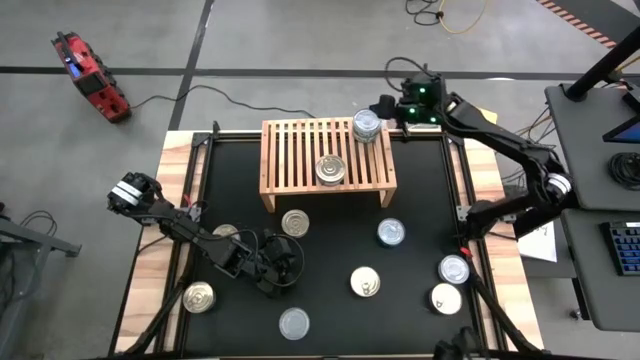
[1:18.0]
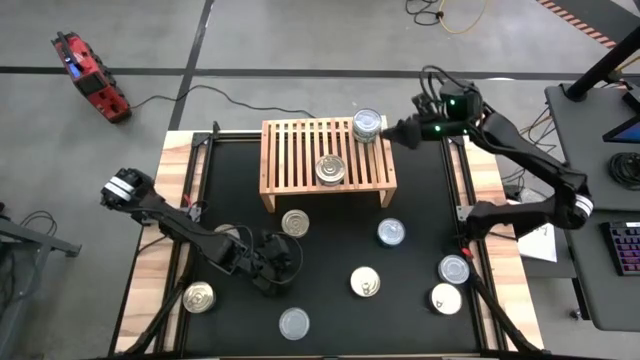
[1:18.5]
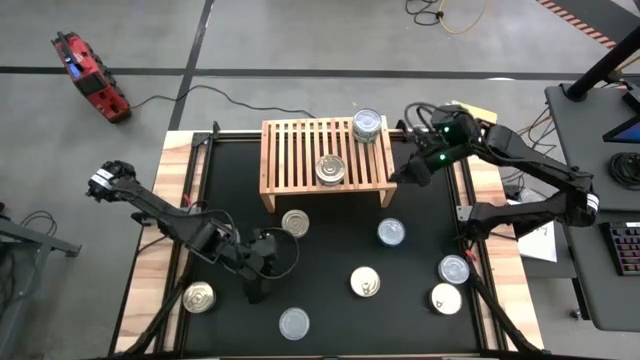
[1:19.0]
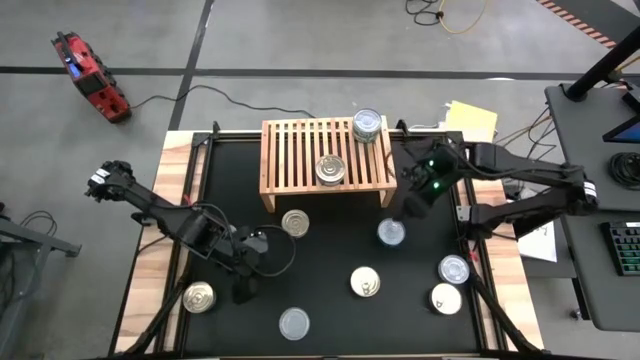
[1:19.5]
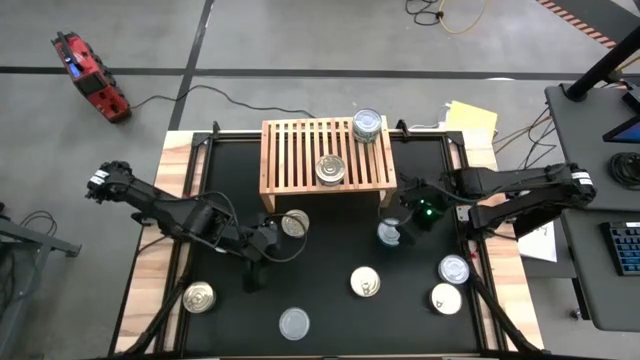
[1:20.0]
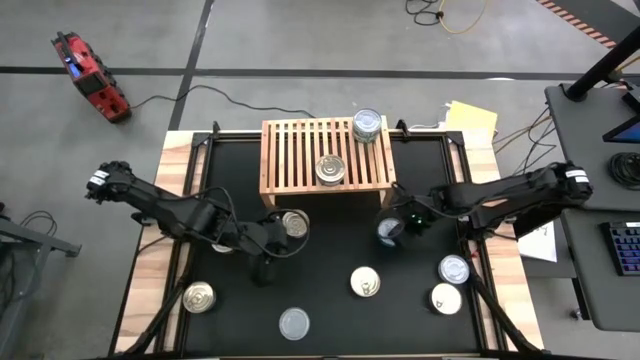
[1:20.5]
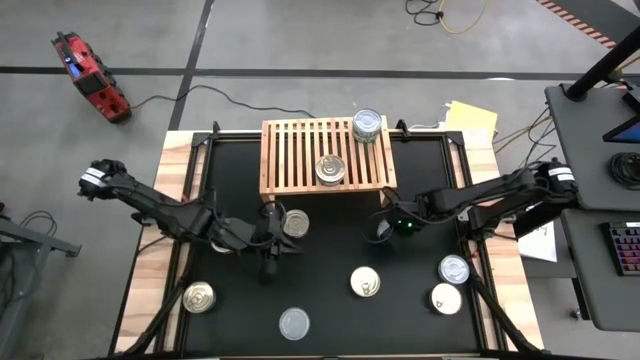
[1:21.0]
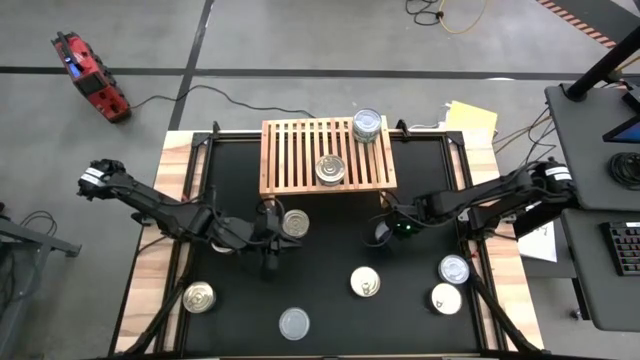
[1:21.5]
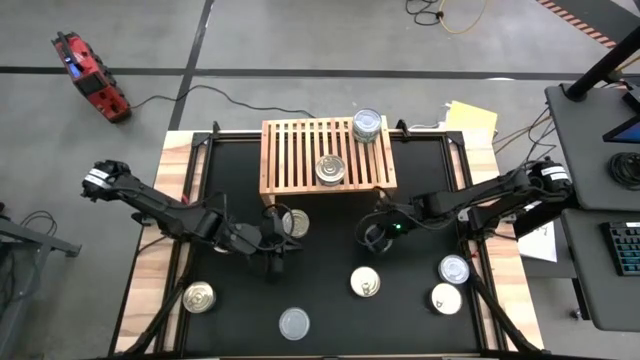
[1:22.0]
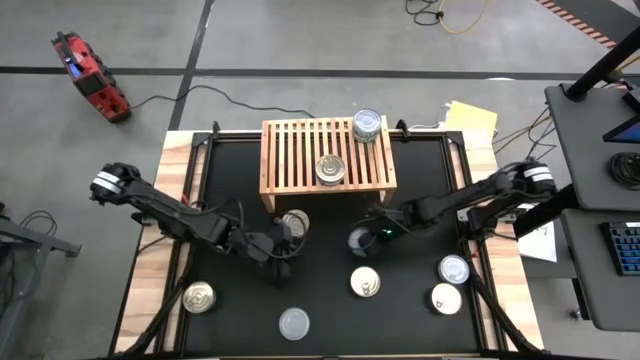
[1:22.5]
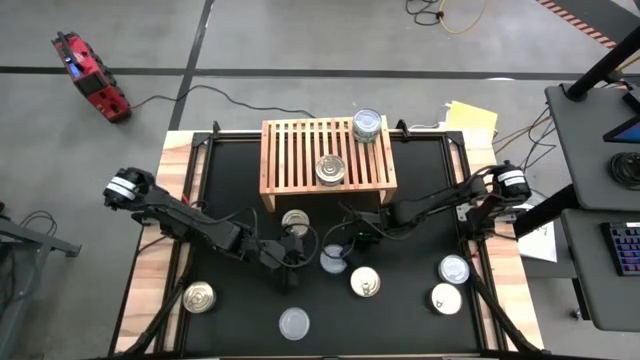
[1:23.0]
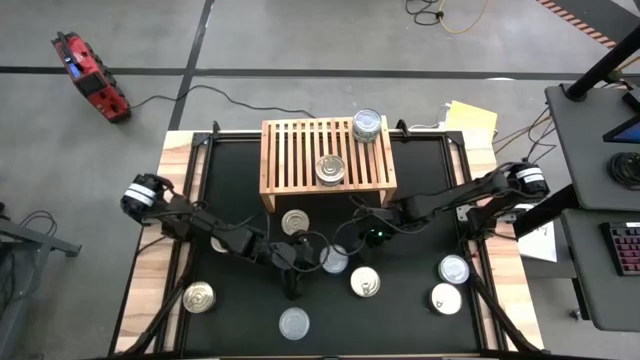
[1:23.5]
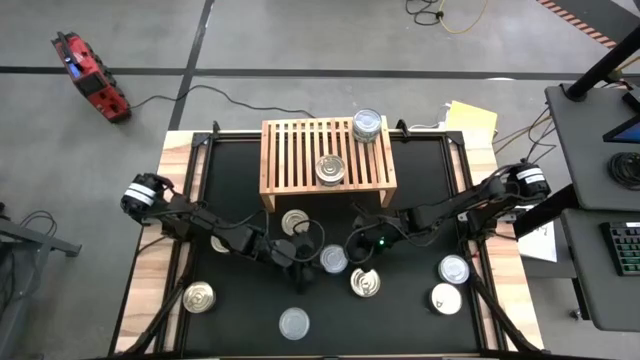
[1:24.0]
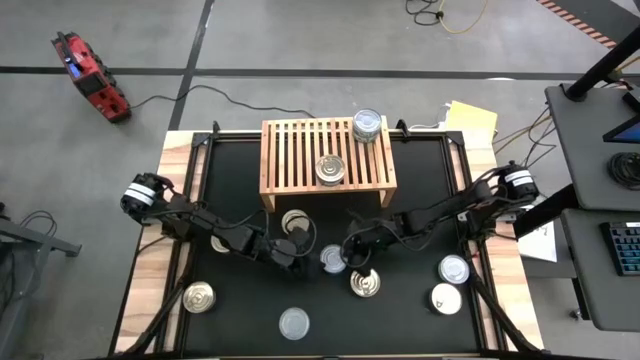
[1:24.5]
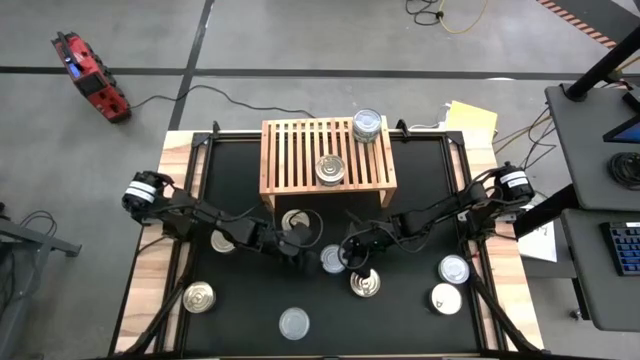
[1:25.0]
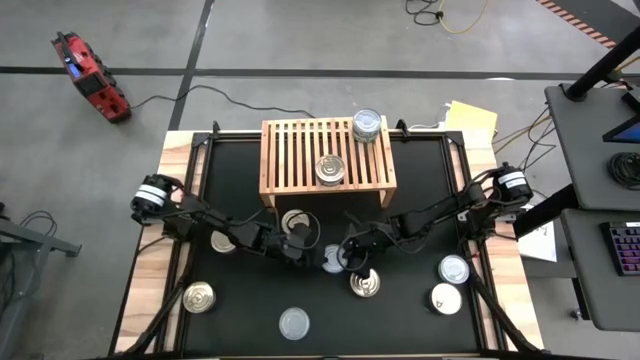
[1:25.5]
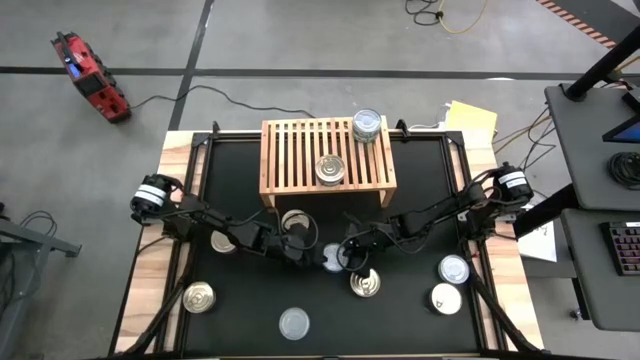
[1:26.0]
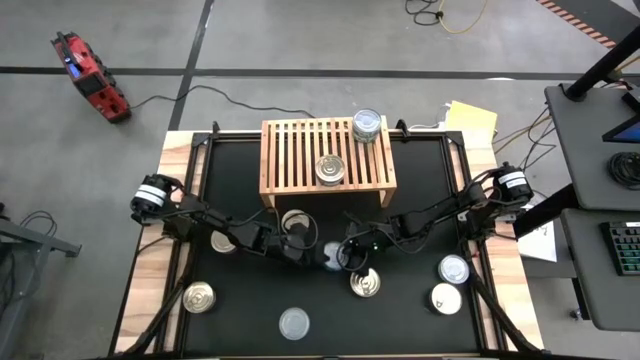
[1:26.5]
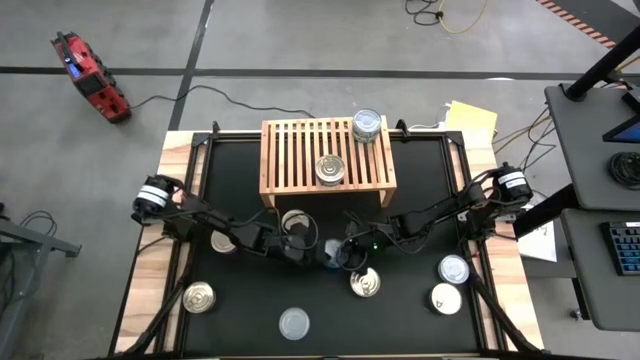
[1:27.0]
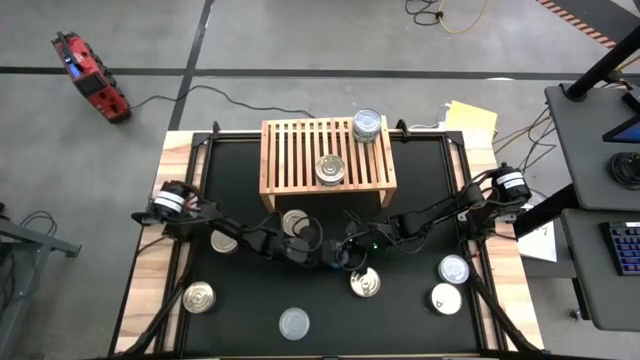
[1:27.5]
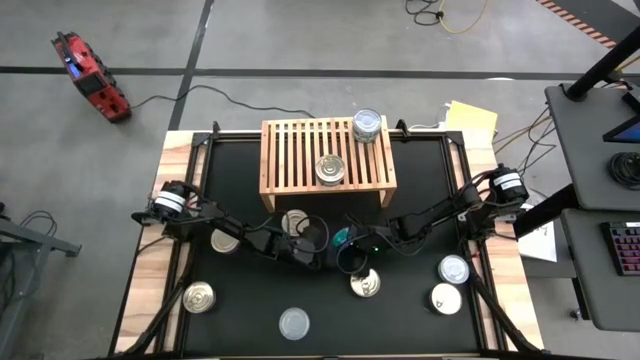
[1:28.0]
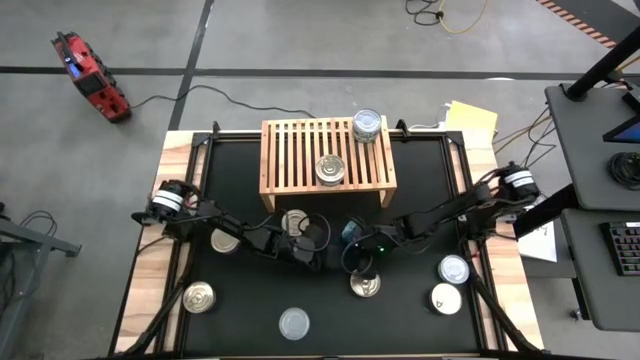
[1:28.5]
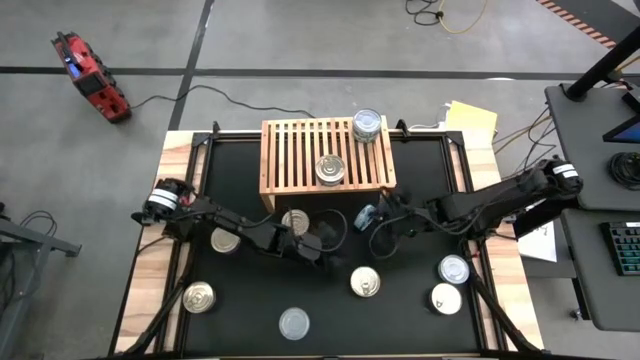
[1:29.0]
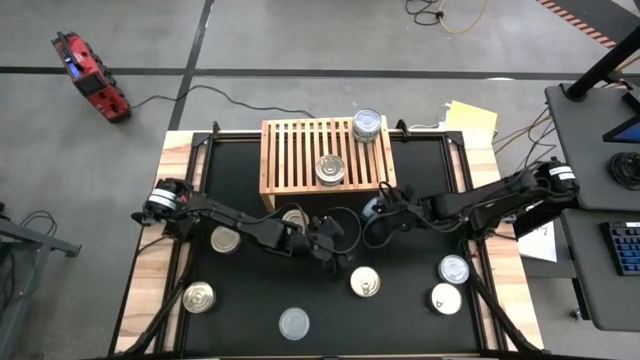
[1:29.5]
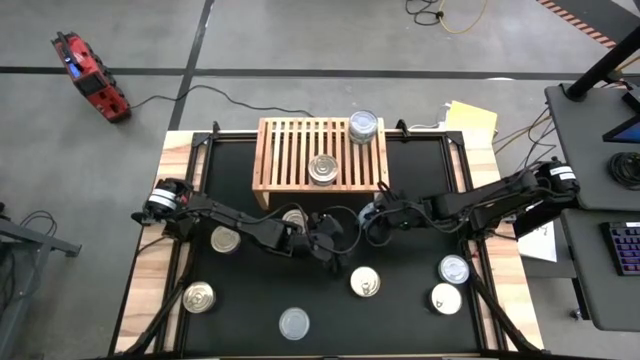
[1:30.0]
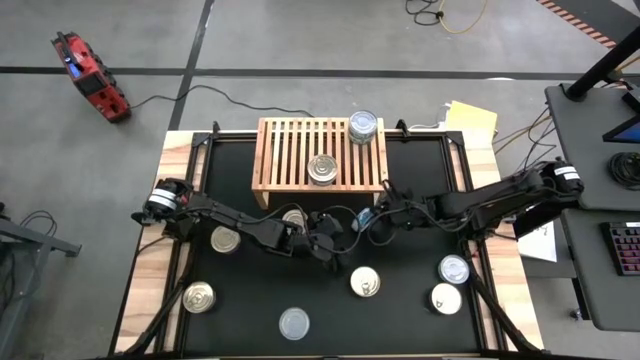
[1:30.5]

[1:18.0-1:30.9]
Task: Stack canned seafood by type on shelf
Put the green blue tuna can on the shelf

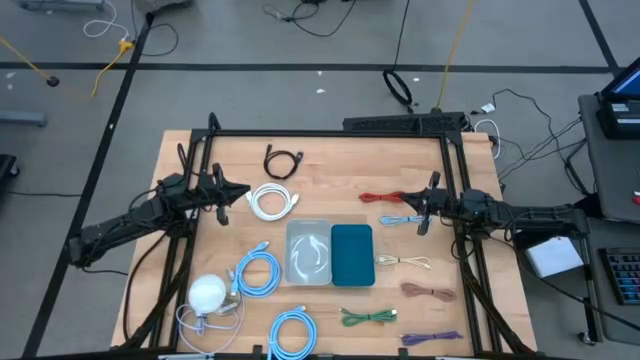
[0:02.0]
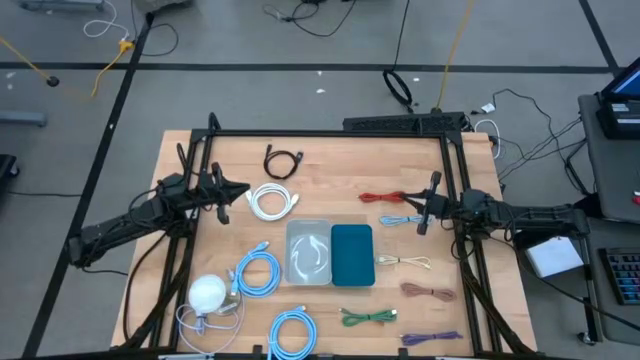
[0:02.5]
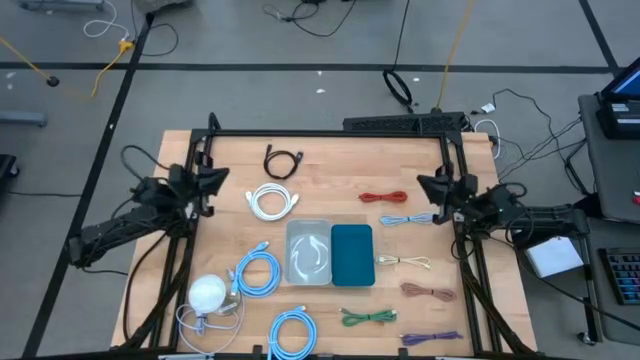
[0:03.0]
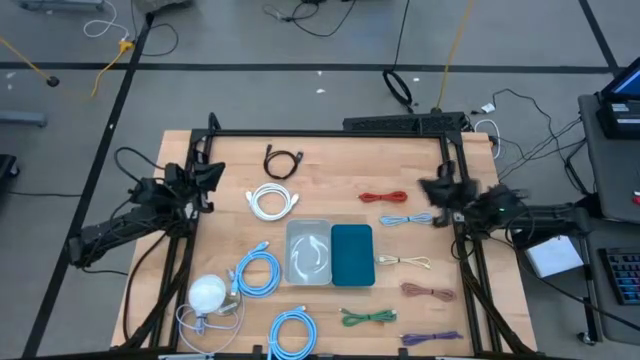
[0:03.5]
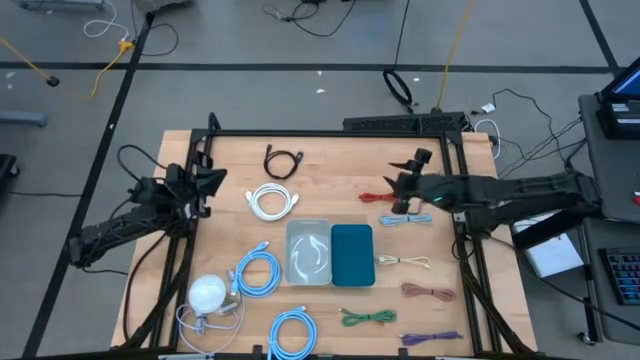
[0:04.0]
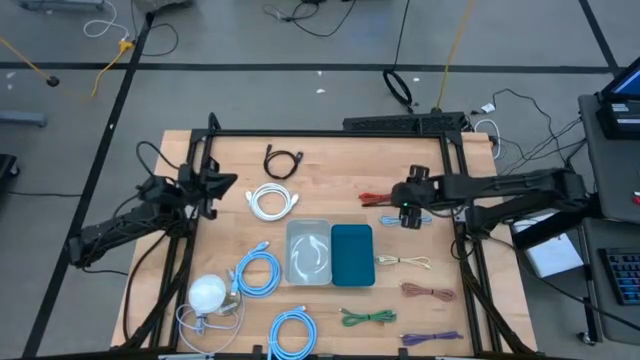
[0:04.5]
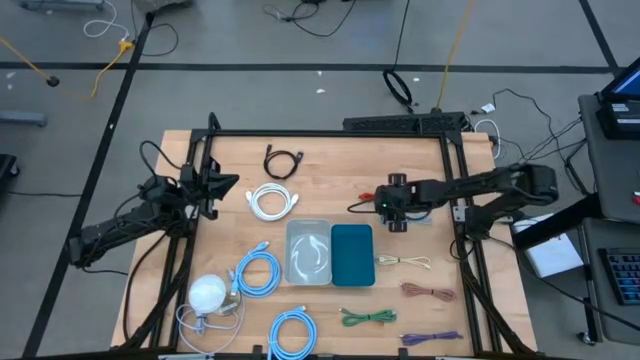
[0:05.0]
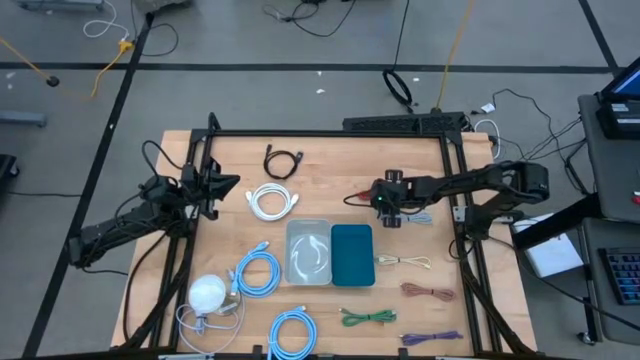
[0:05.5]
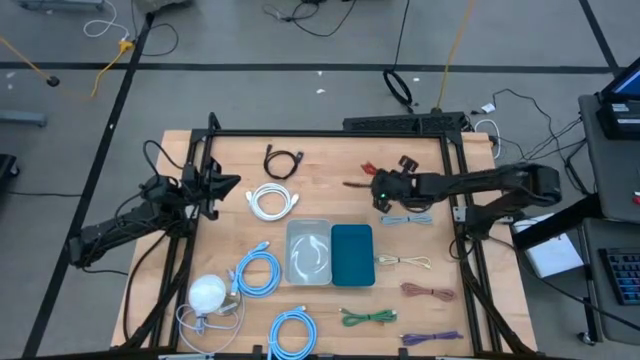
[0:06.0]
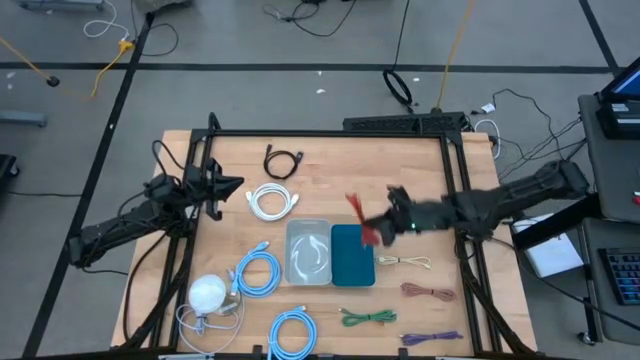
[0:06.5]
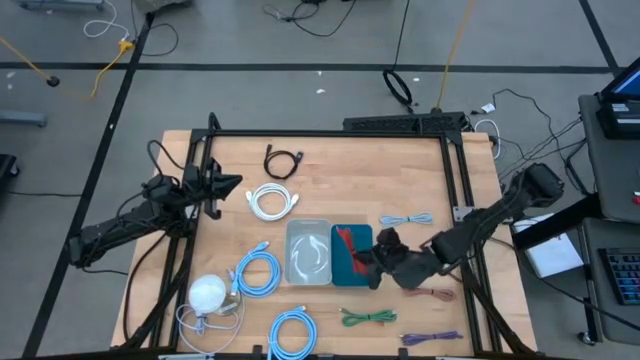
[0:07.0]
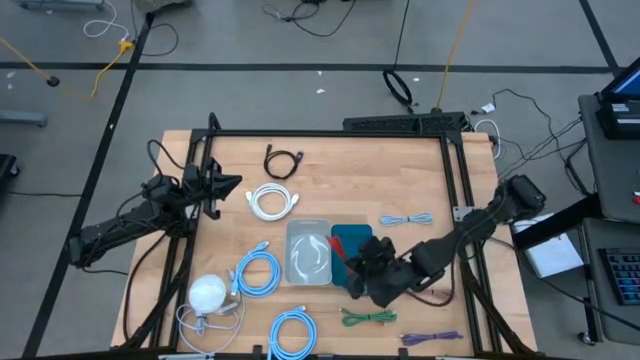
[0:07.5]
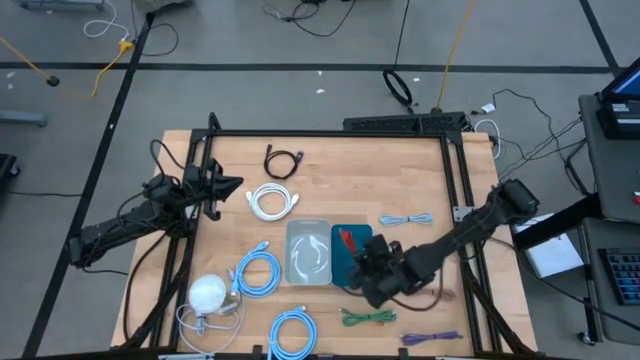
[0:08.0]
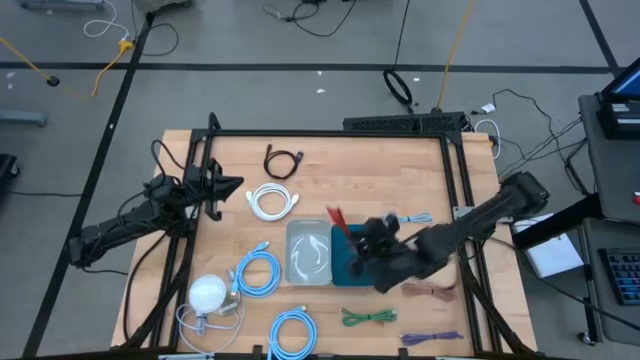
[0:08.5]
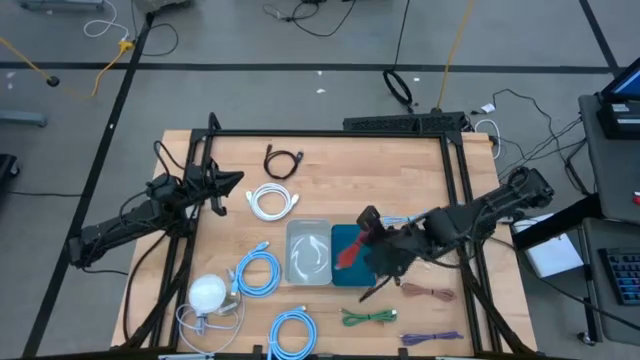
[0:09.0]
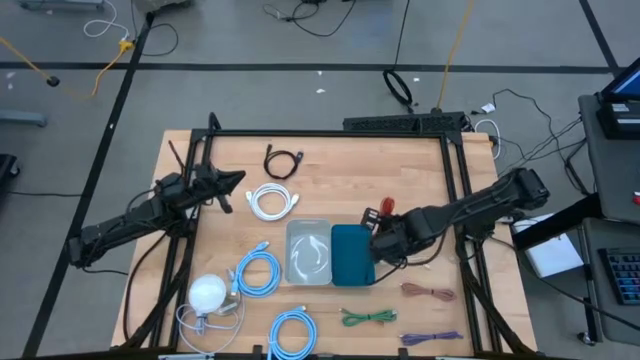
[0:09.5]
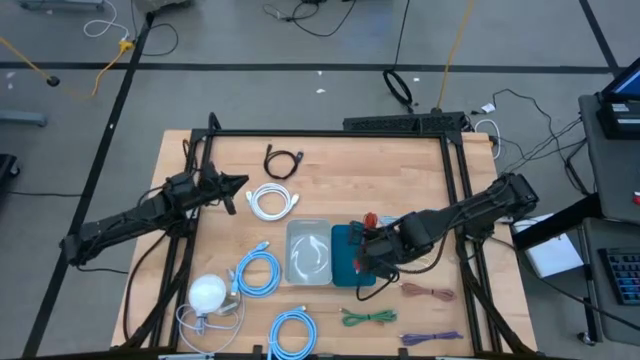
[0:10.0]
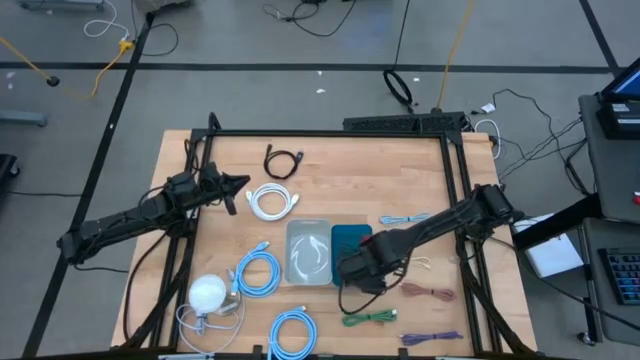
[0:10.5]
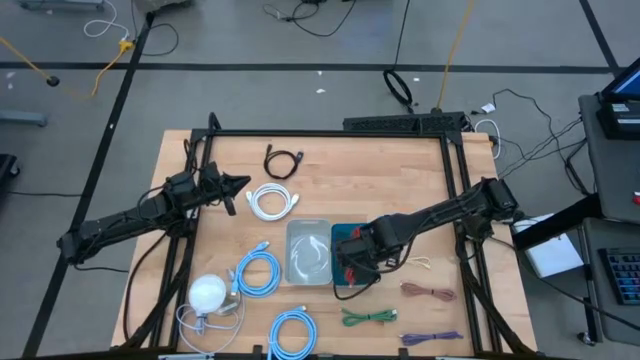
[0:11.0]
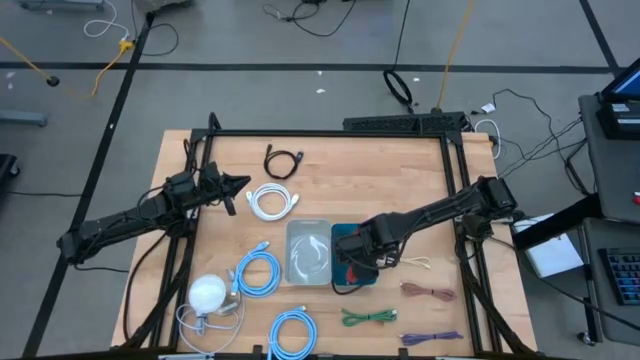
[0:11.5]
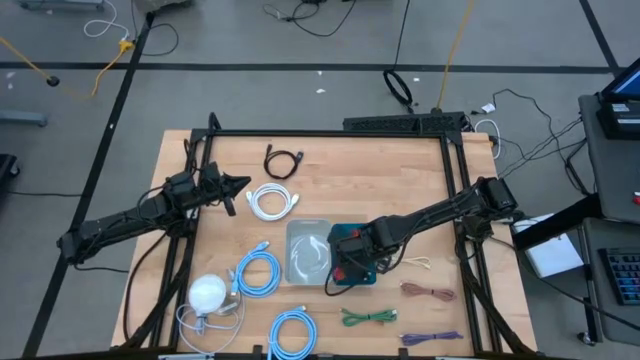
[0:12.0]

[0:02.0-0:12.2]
Task: Pick & Place USB Port
Put the orange charger cable into the blue bin
